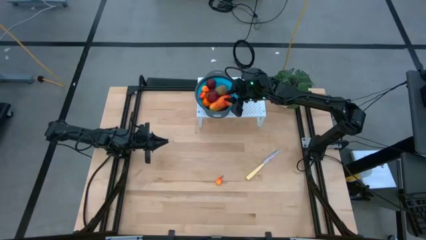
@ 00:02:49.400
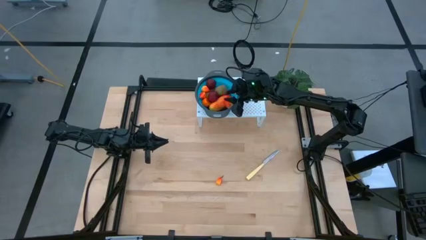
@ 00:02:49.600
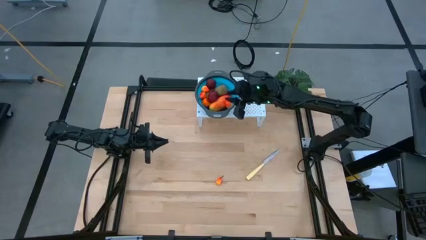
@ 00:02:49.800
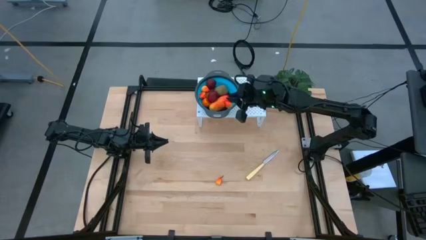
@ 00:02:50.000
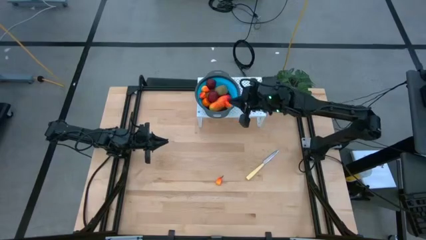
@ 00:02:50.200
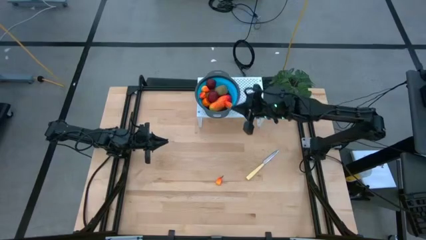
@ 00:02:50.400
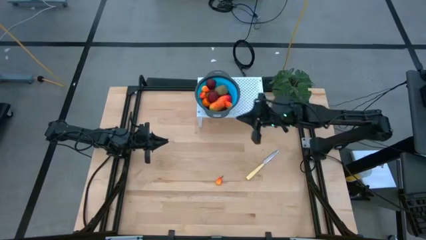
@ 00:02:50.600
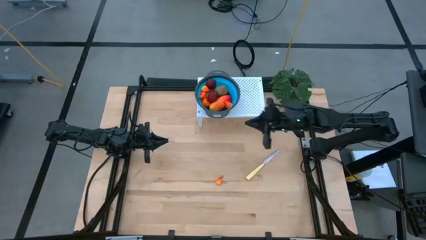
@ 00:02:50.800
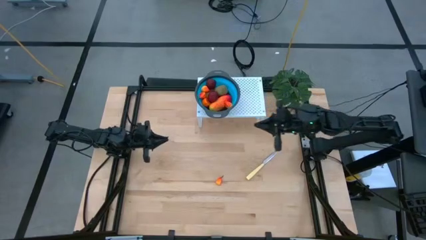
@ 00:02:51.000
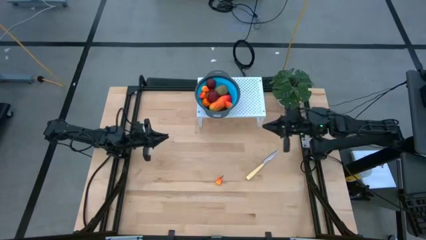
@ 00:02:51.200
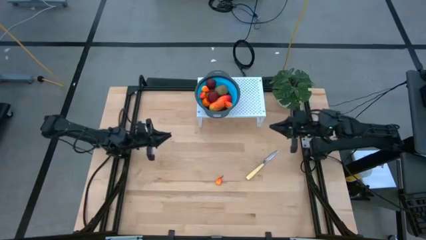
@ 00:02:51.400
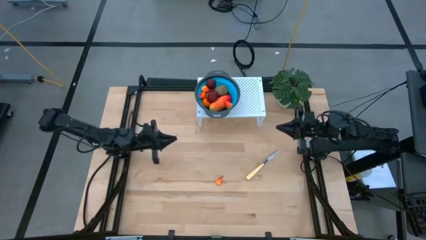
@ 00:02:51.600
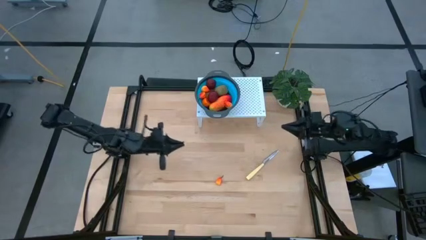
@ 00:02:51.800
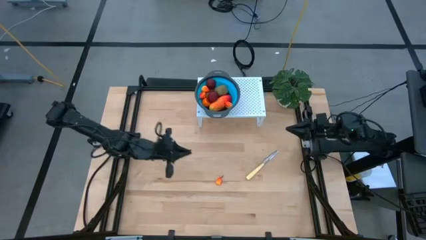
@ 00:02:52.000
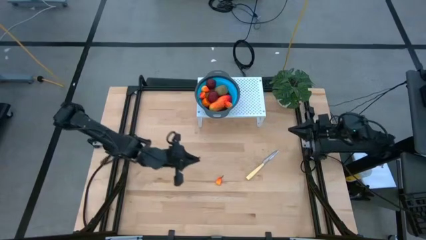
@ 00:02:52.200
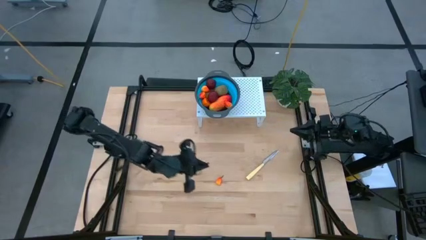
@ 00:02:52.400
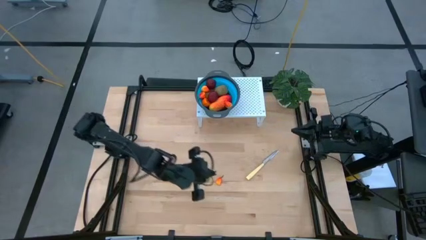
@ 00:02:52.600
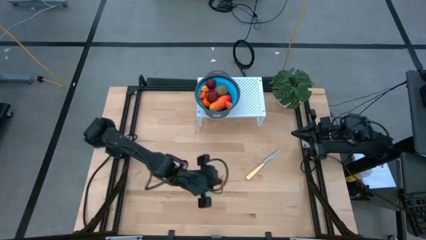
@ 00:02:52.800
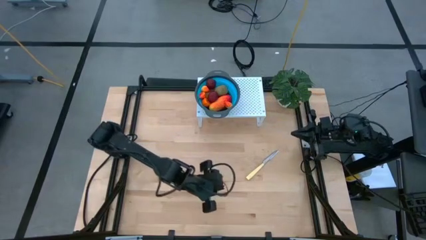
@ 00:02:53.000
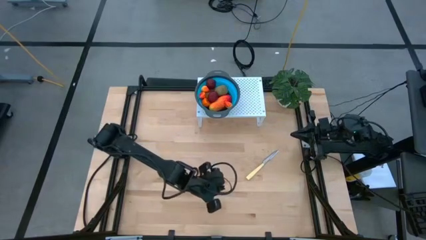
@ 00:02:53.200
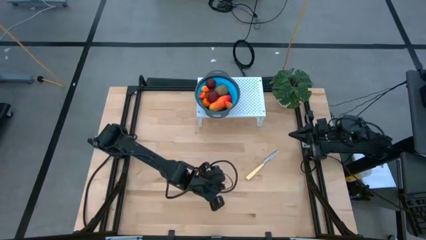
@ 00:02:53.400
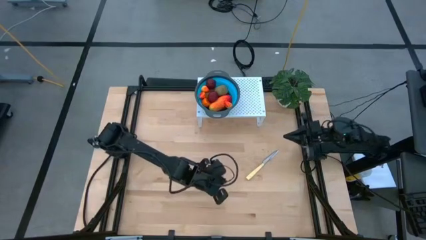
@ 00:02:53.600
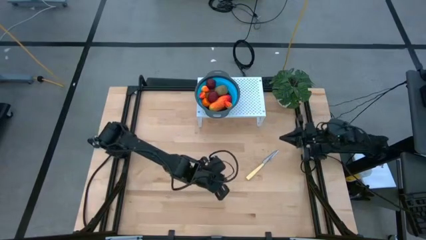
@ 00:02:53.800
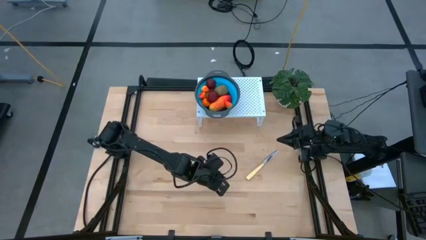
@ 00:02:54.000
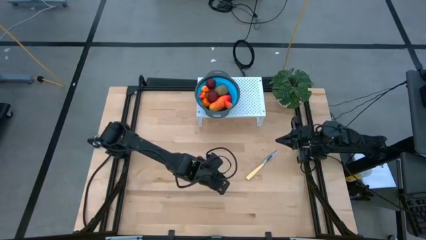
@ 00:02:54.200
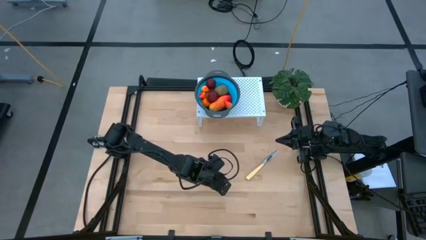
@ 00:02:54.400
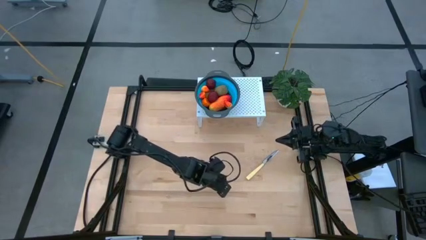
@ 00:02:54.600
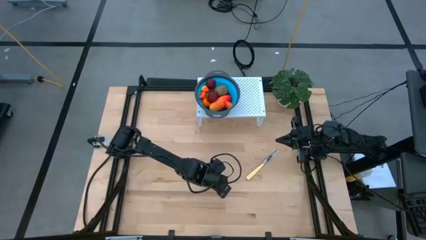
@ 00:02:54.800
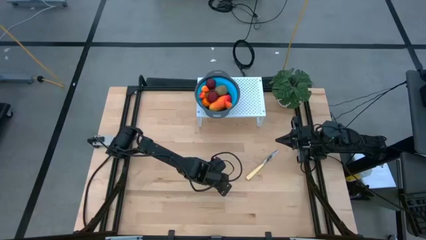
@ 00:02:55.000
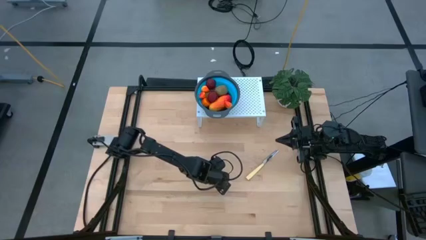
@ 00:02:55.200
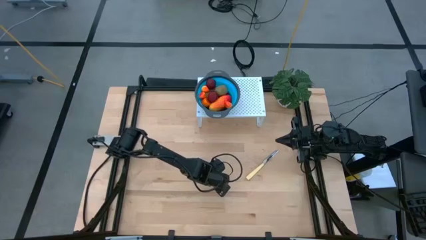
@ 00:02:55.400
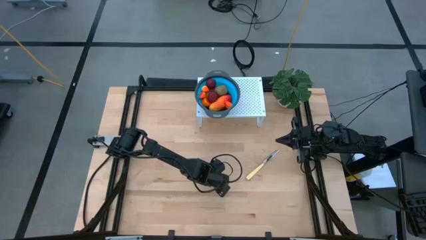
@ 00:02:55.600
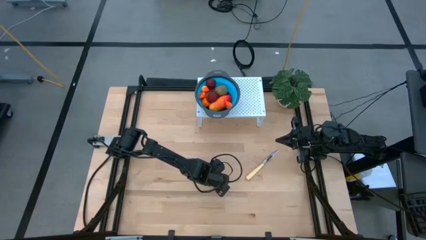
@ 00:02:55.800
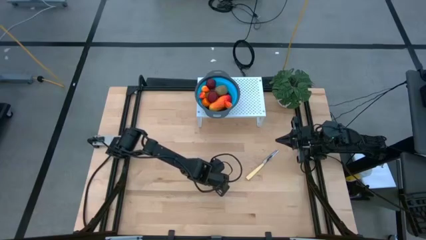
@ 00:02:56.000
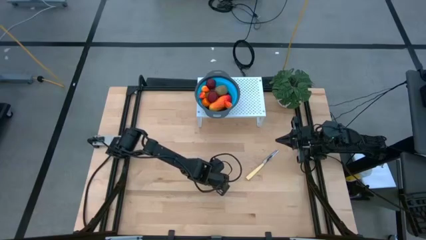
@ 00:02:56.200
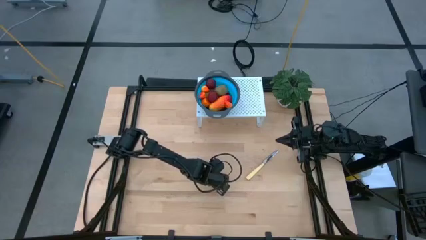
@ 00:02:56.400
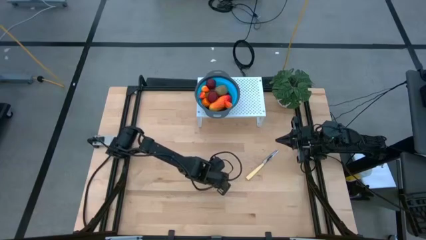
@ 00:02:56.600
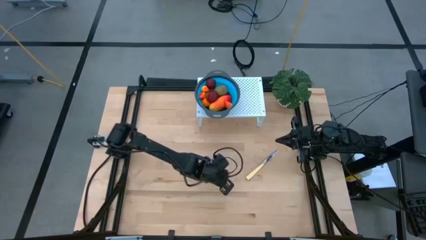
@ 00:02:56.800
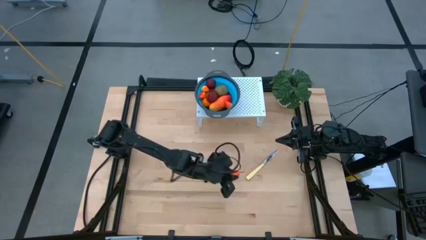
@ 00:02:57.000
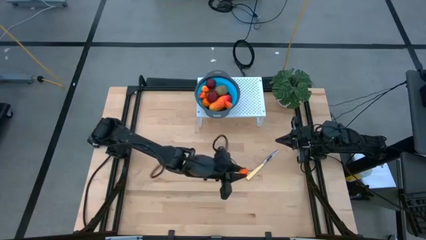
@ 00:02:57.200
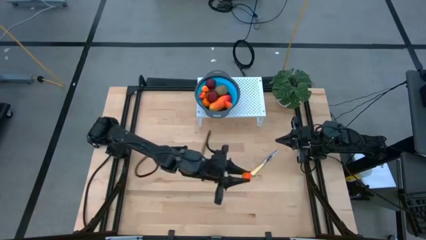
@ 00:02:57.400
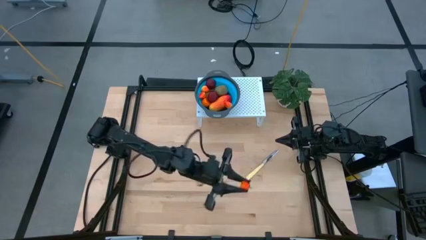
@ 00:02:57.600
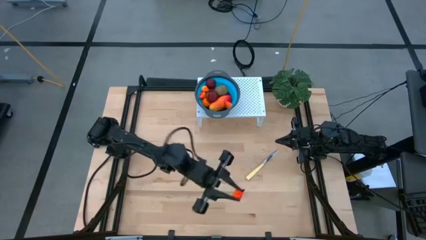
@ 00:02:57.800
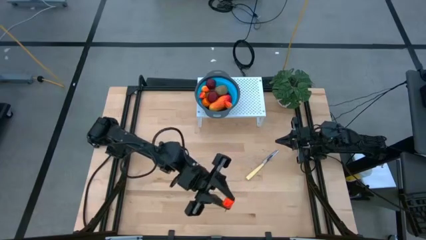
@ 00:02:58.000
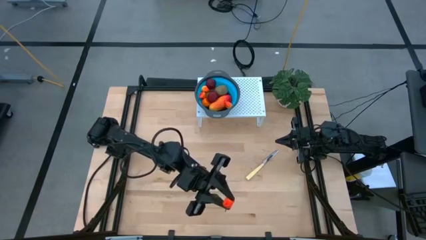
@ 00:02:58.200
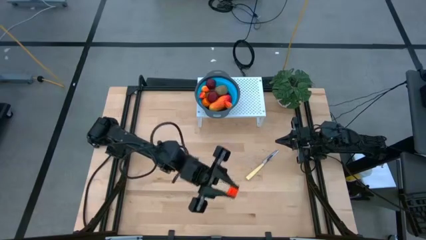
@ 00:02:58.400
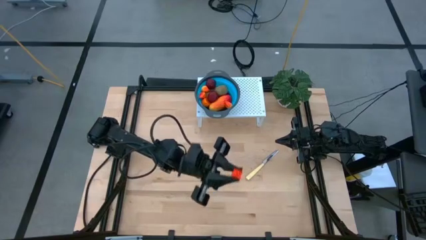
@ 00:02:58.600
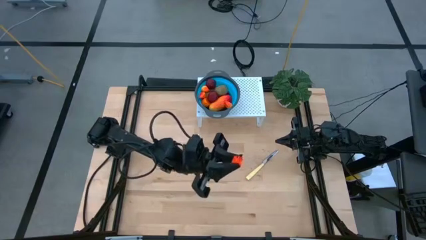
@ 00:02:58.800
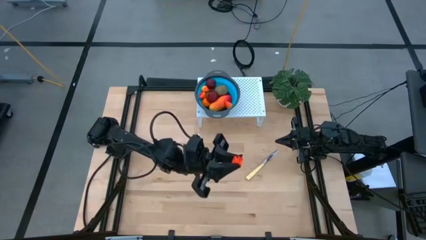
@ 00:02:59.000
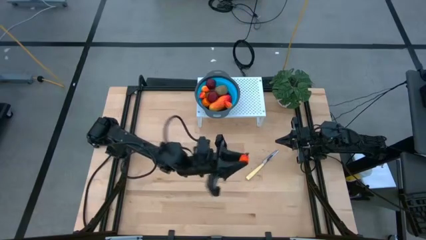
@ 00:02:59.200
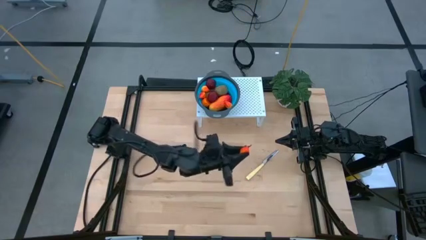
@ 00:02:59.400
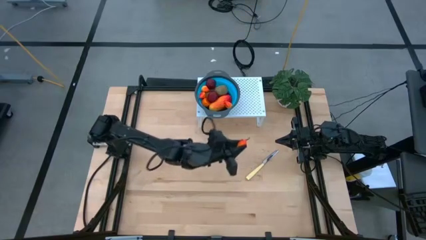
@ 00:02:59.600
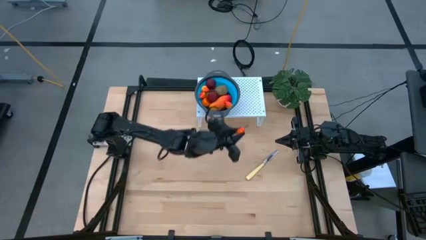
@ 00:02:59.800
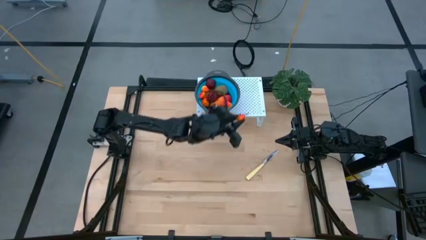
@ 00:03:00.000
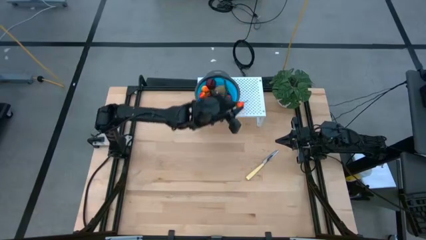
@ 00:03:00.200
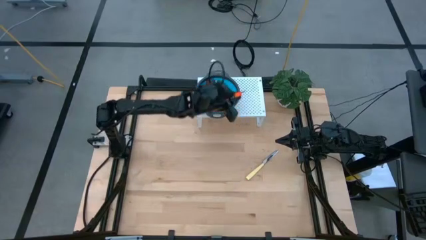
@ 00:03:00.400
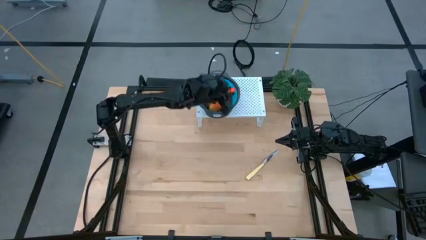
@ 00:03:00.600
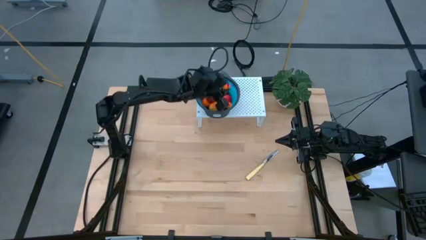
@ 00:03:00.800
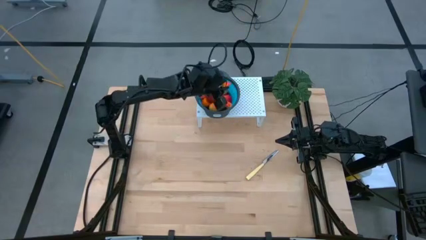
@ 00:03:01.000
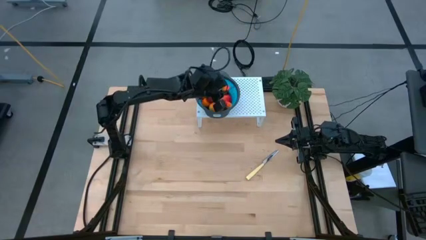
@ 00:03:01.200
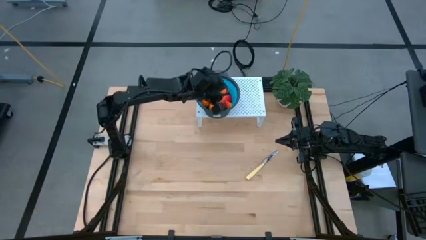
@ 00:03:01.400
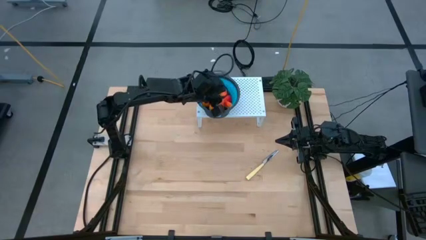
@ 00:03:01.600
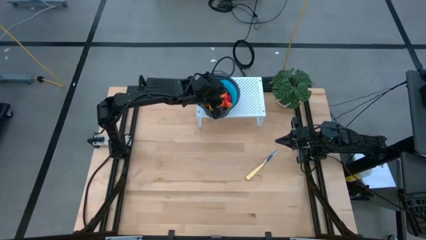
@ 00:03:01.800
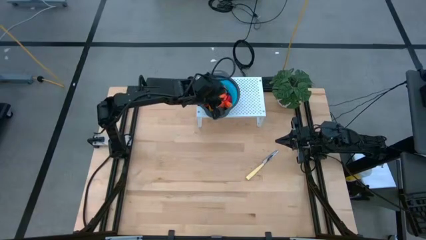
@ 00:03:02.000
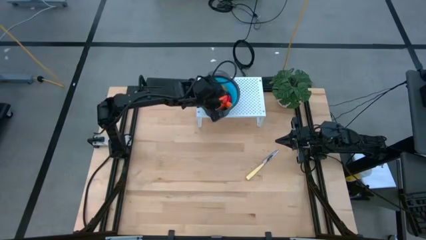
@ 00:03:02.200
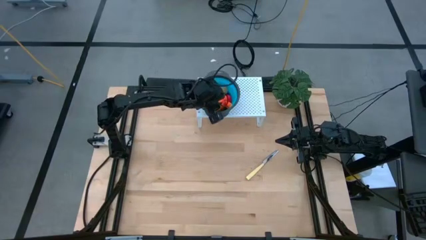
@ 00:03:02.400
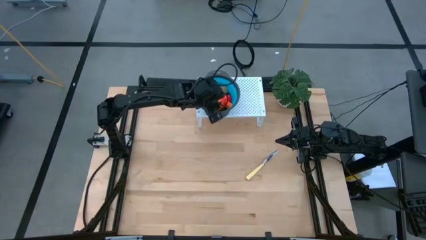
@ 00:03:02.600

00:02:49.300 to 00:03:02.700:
Task: Pick & Place Fruit
Put the pear into the blue strainer bowl on the shelf
